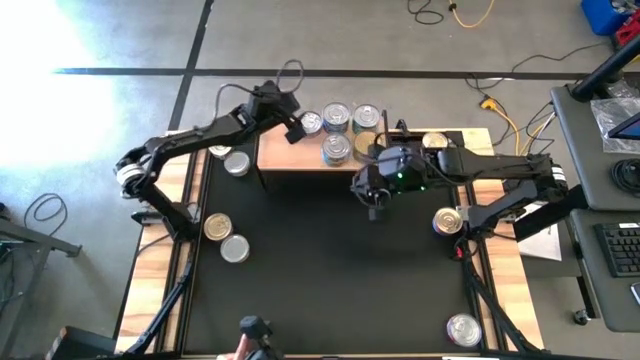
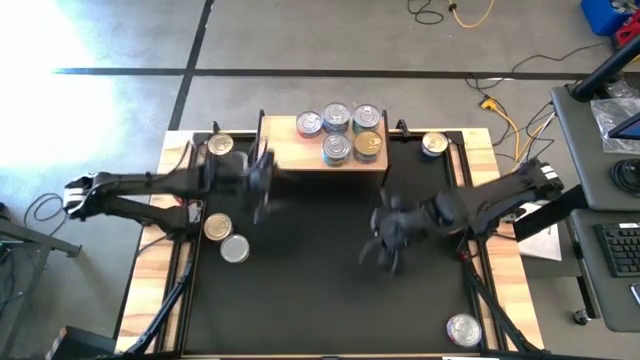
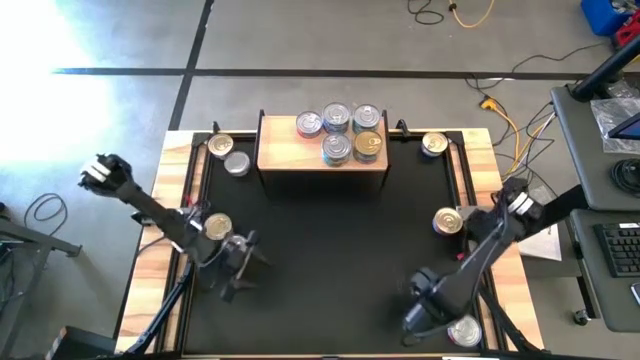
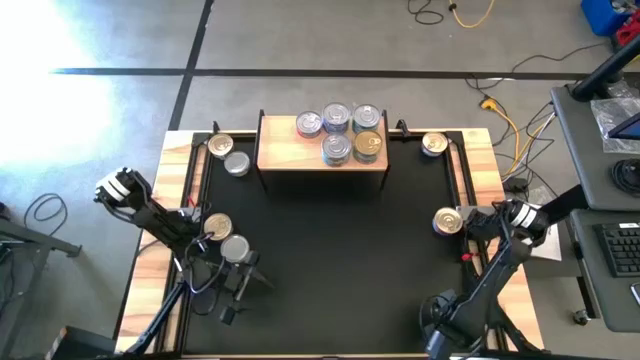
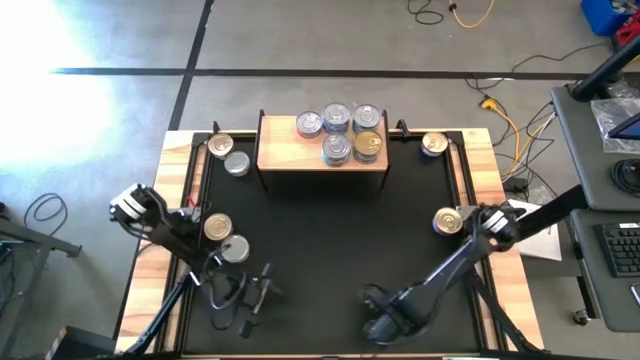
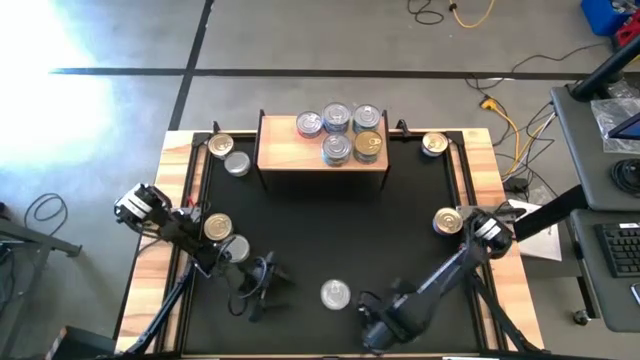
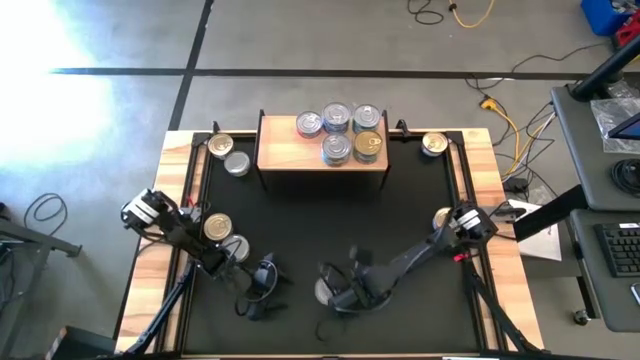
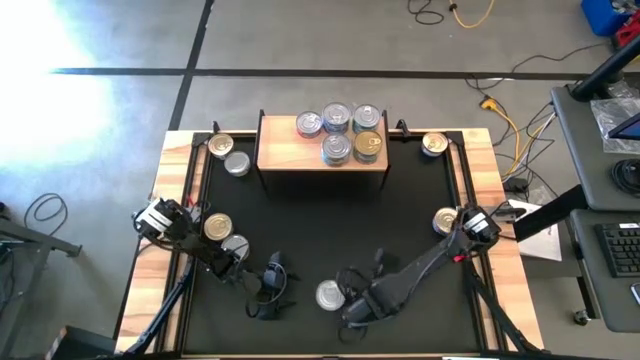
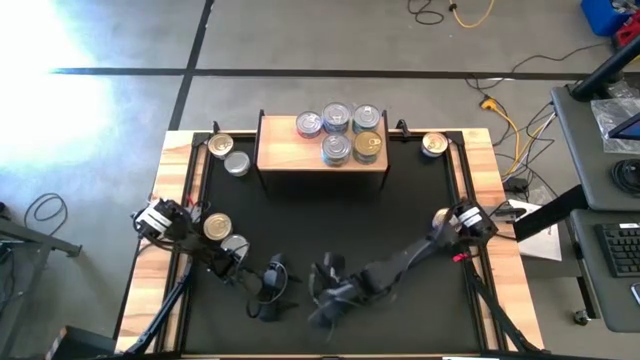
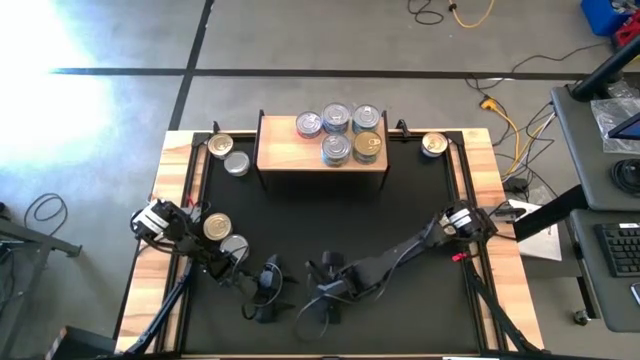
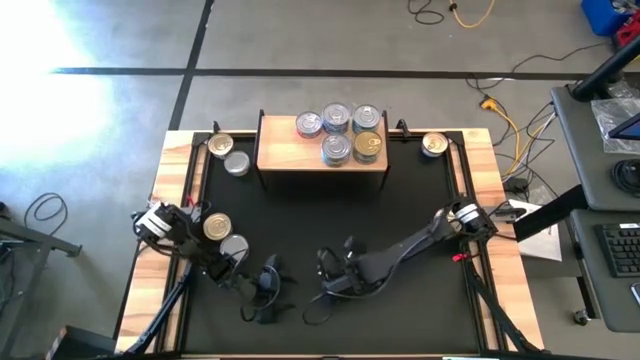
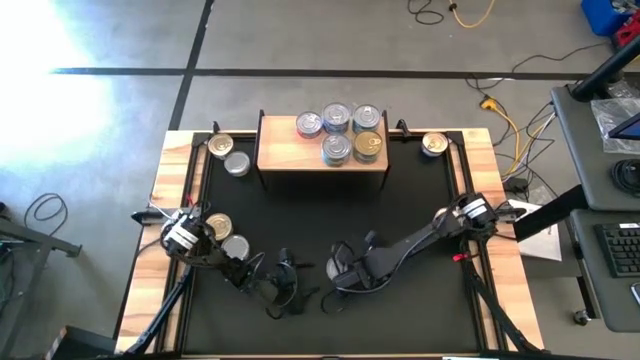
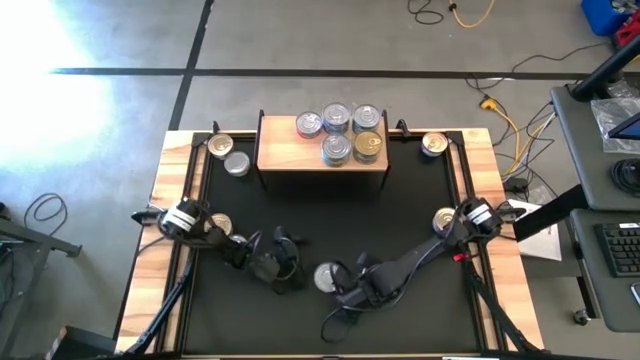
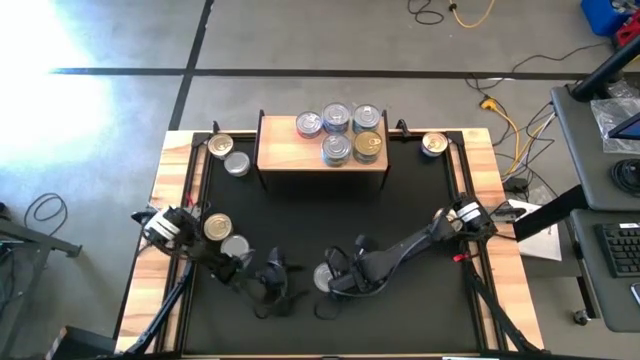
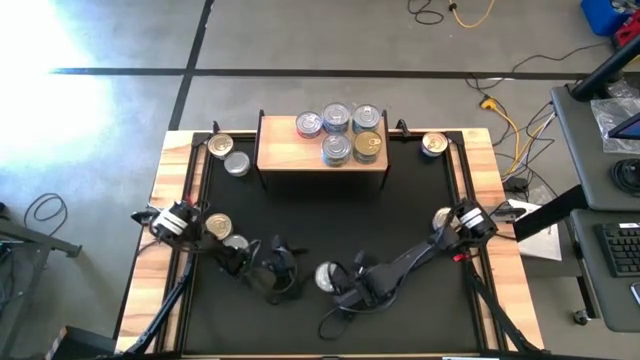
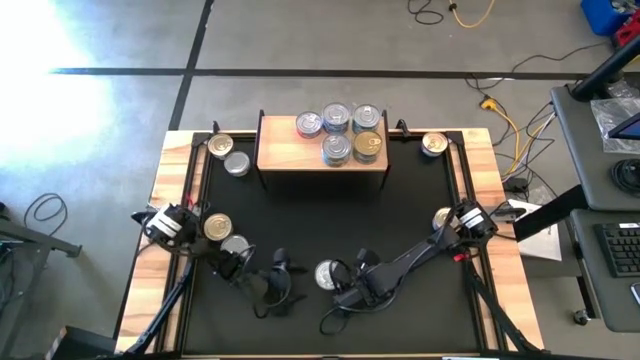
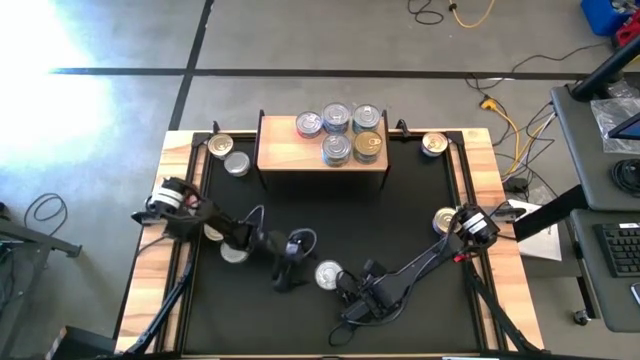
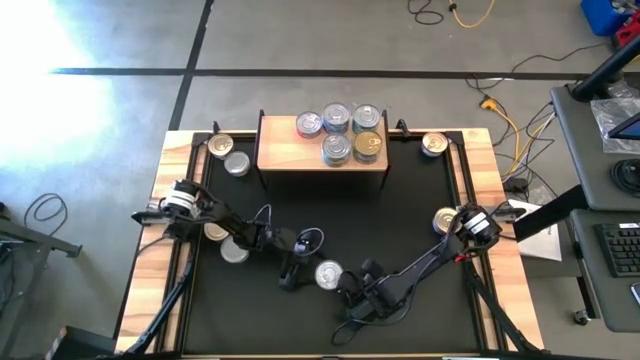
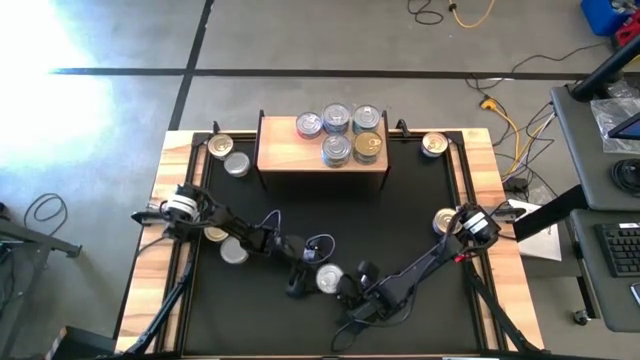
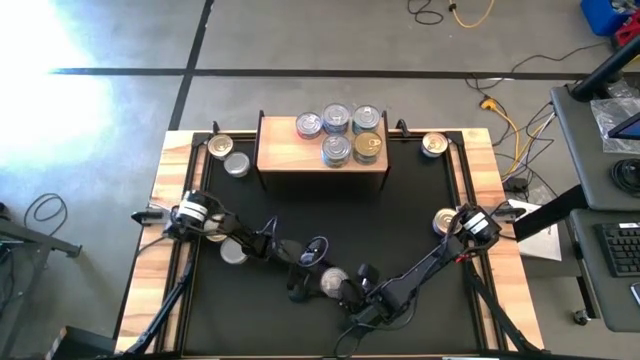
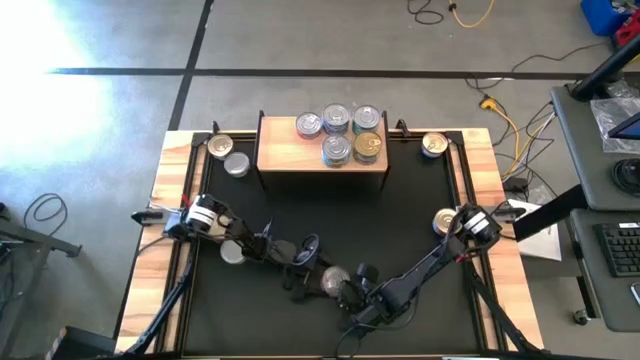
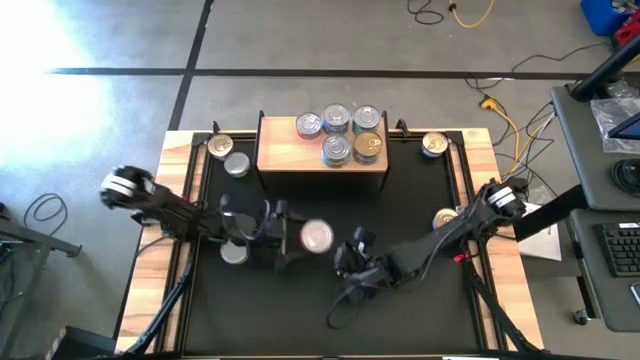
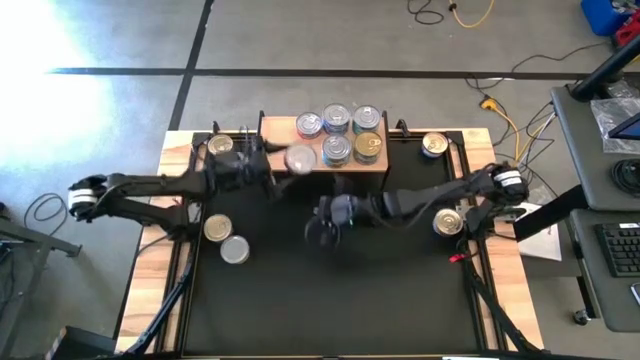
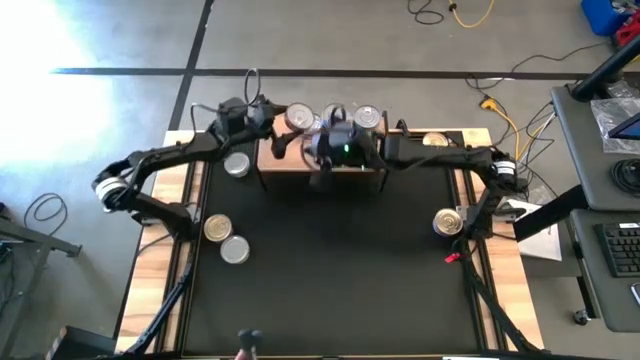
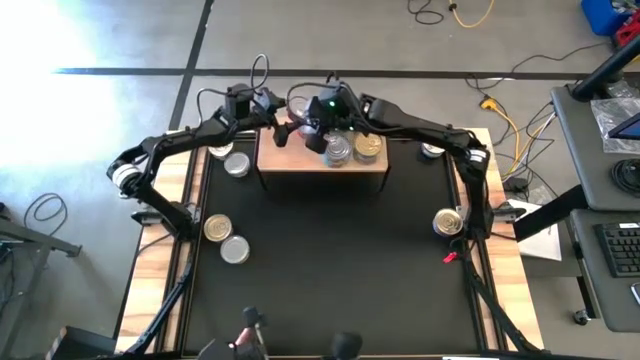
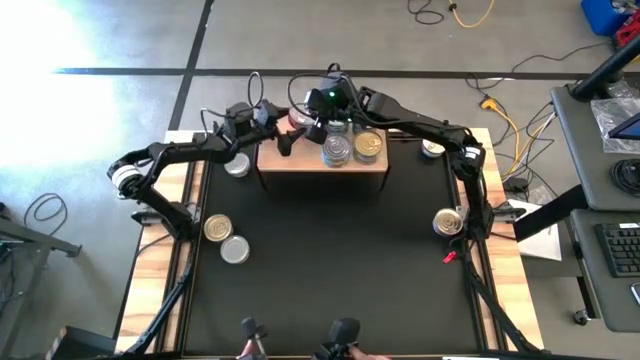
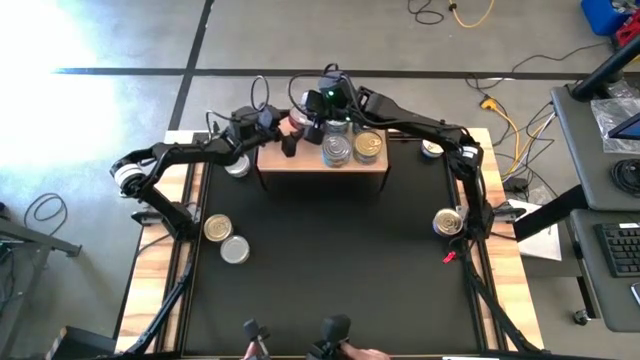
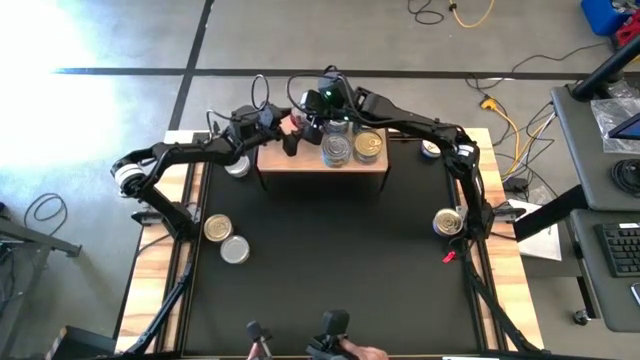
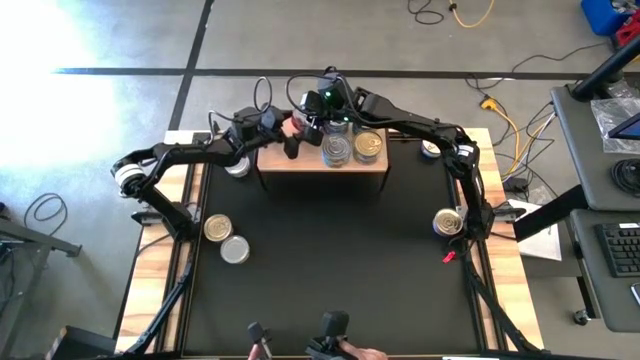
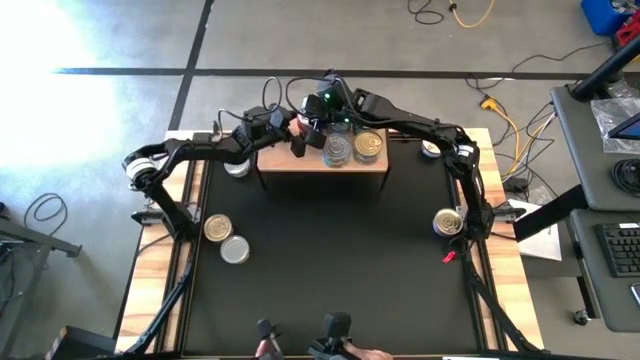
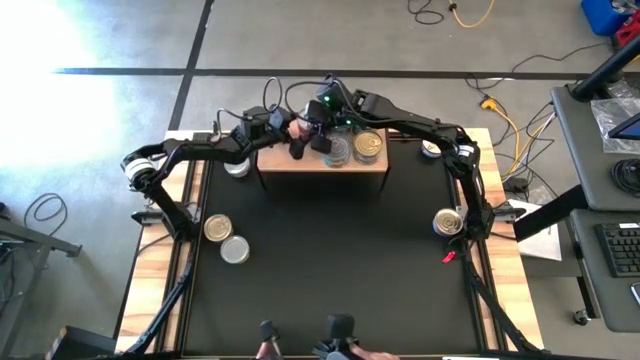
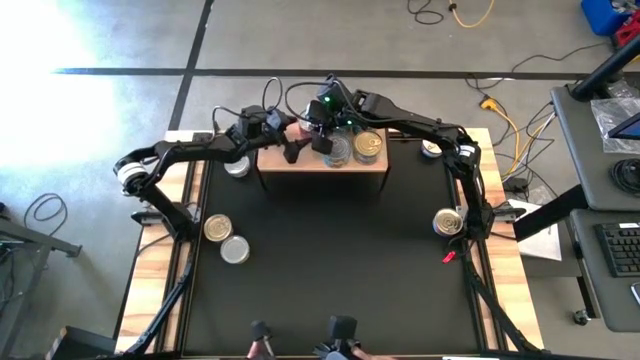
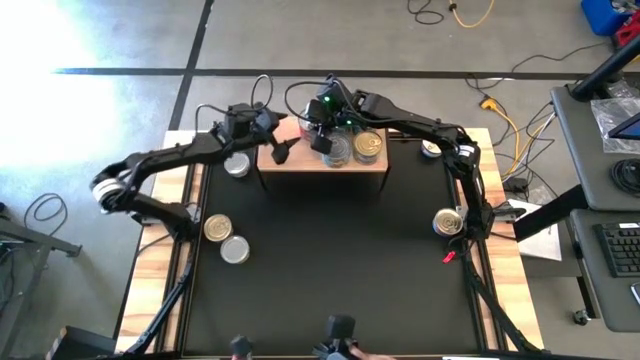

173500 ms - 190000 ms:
Task: Stack canned seafood by type on shelf
Stack the red tuna can on the top of the red tuna can on the shelf

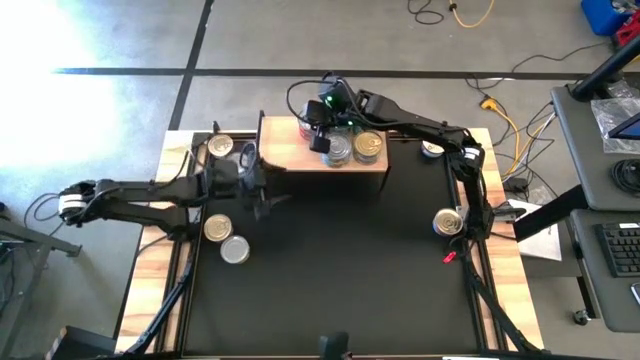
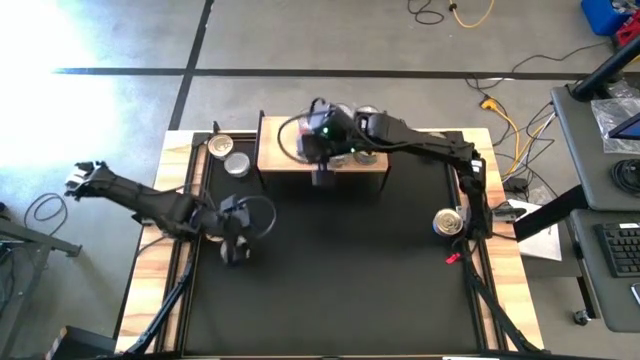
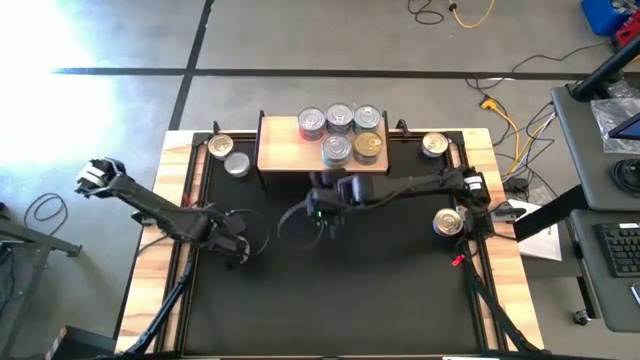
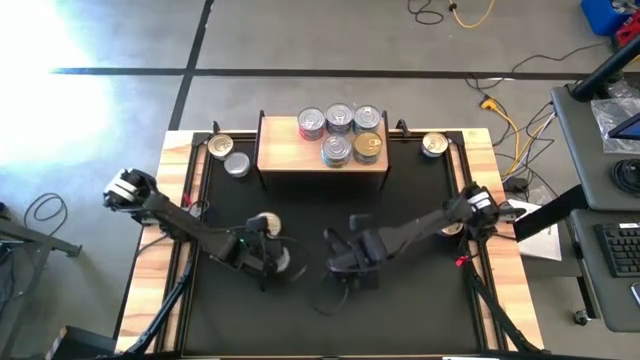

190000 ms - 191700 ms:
Move the bottom white green and the bottom left blue pink tuna can to the right

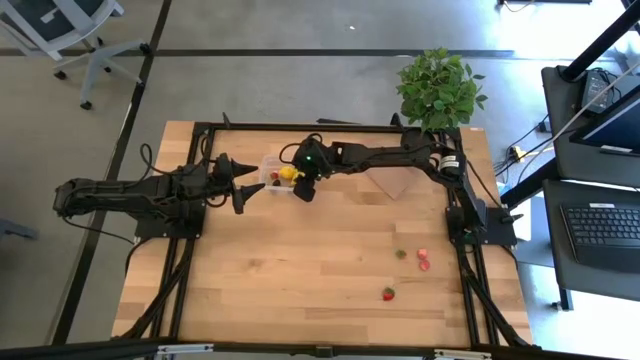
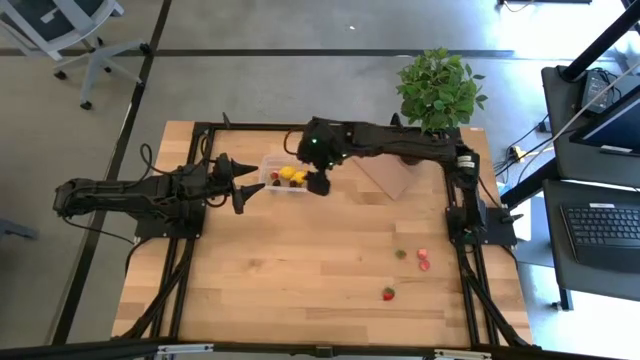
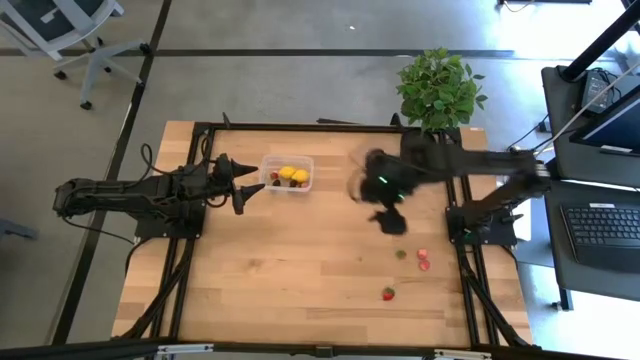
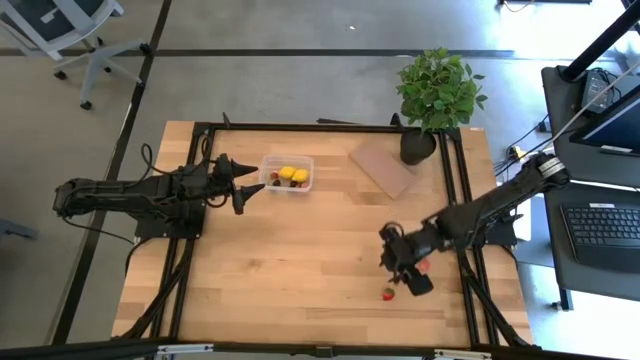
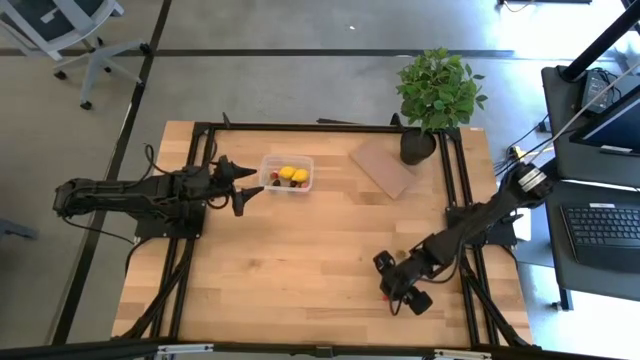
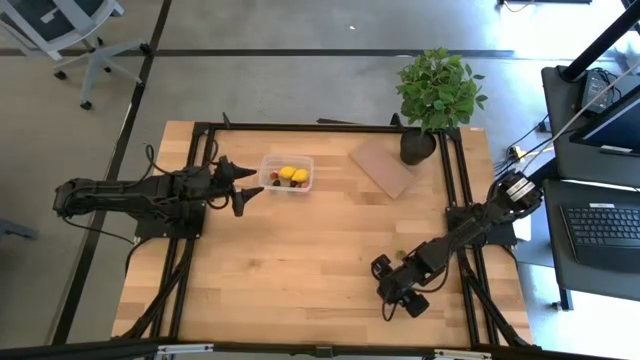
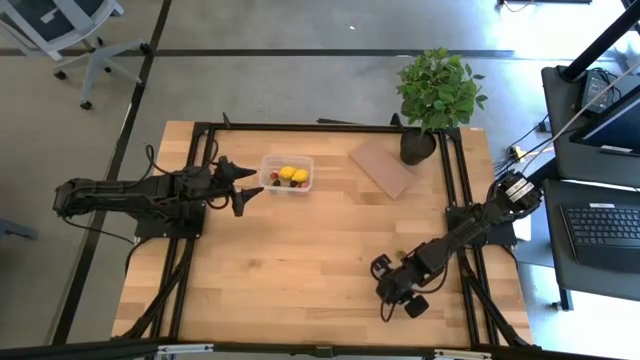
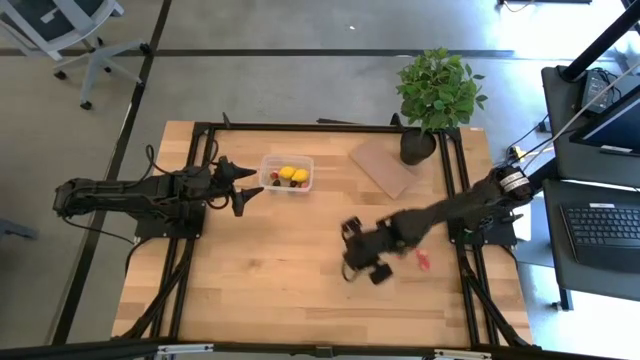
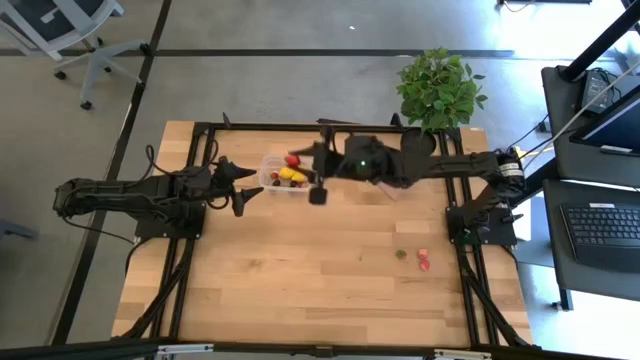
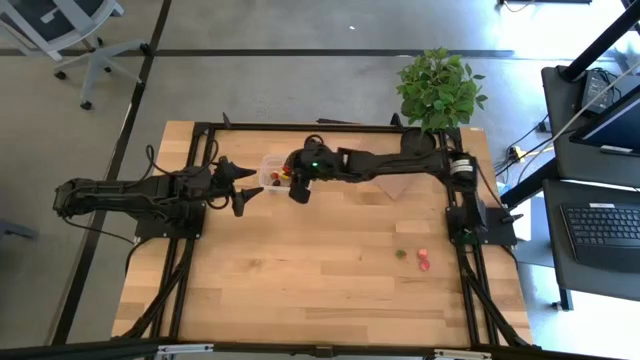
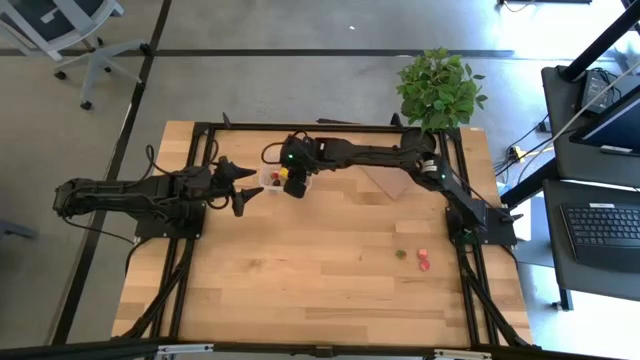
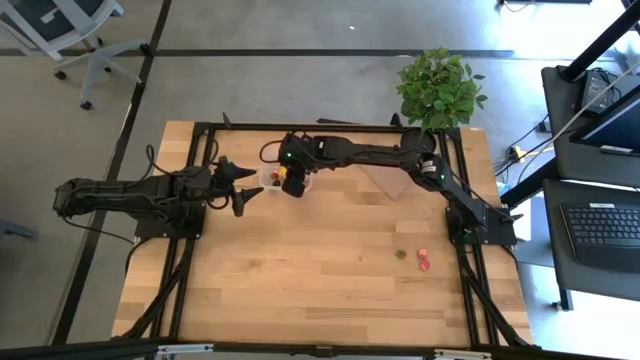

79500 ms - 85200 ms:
Task: Pick and placing Produce into tupperware
Put the red strawberry into the transparent bin
